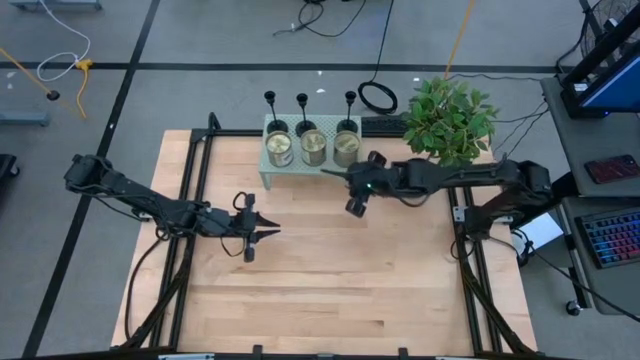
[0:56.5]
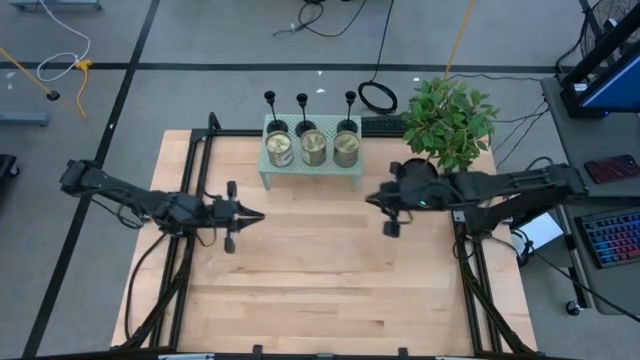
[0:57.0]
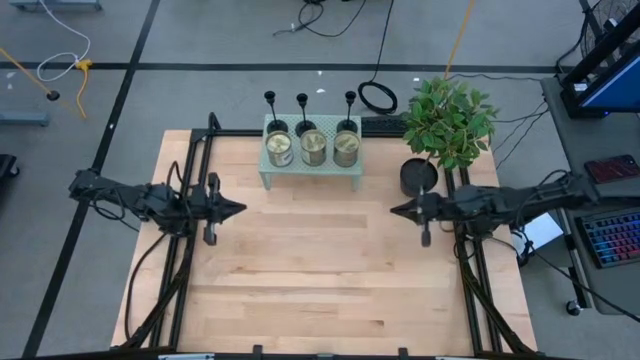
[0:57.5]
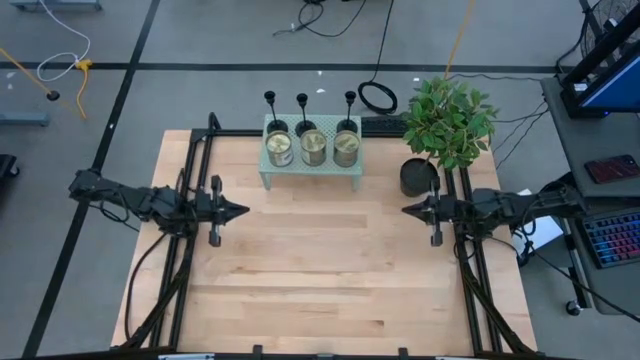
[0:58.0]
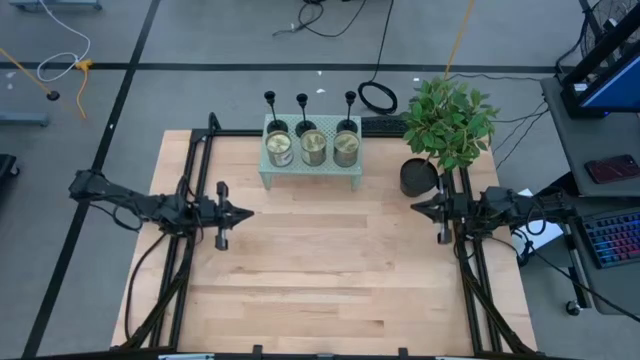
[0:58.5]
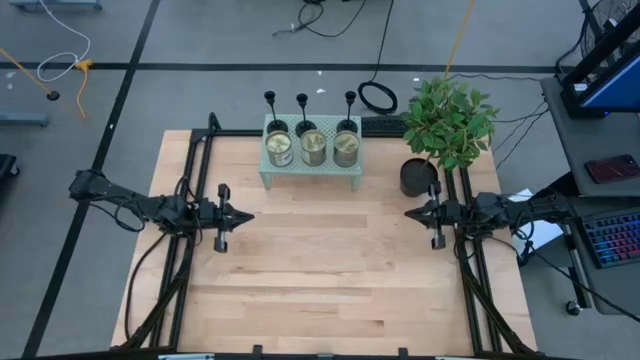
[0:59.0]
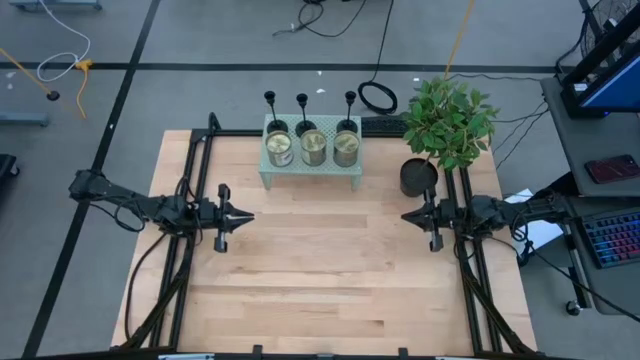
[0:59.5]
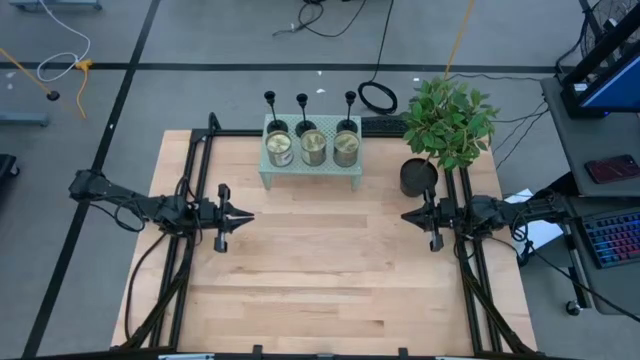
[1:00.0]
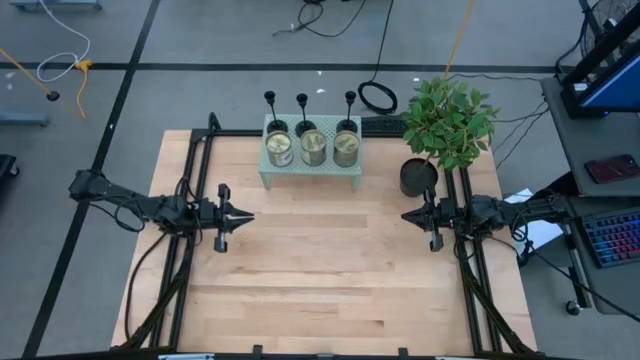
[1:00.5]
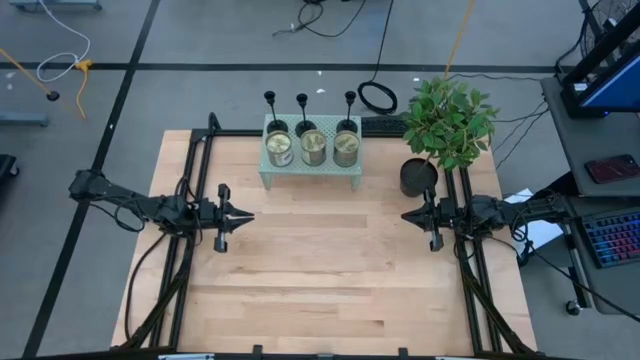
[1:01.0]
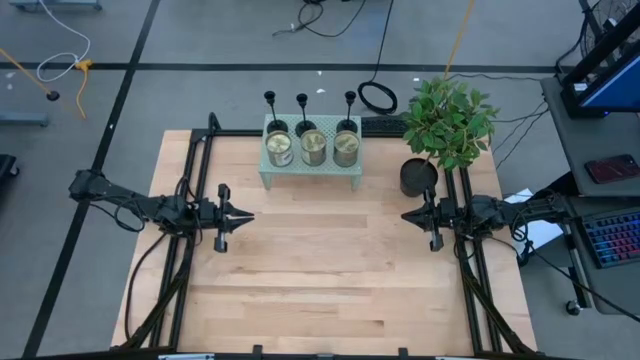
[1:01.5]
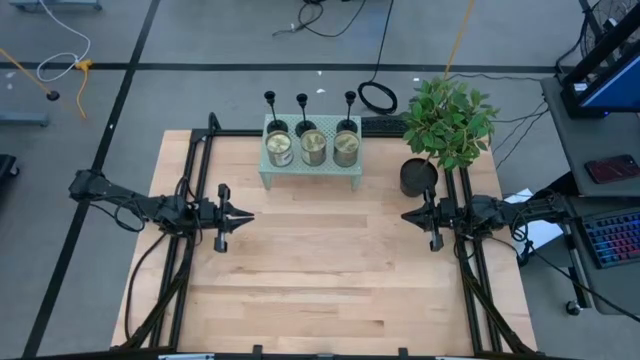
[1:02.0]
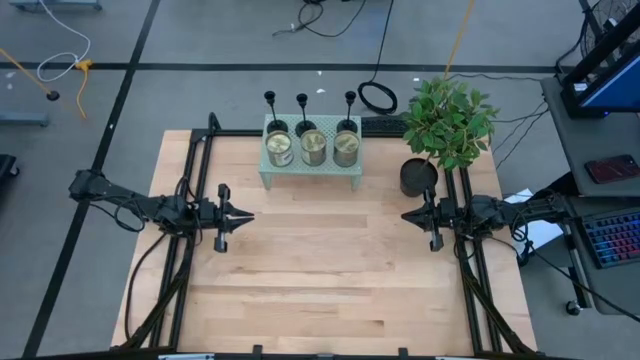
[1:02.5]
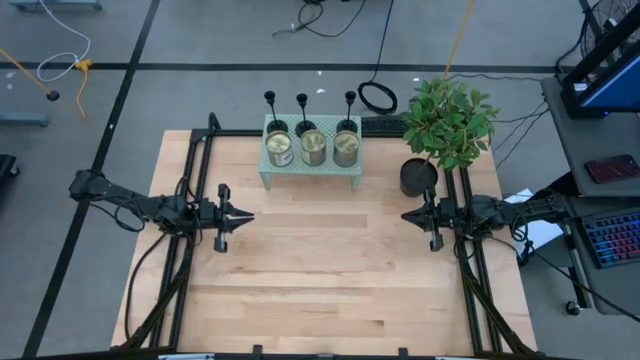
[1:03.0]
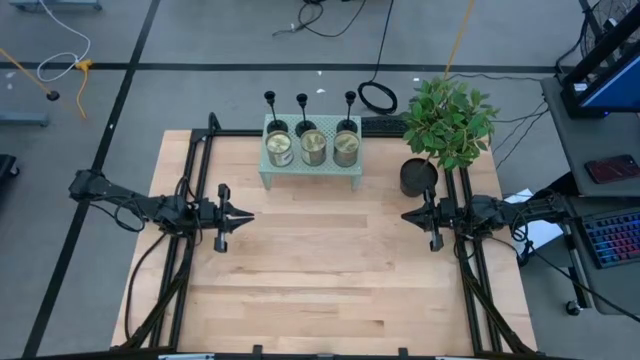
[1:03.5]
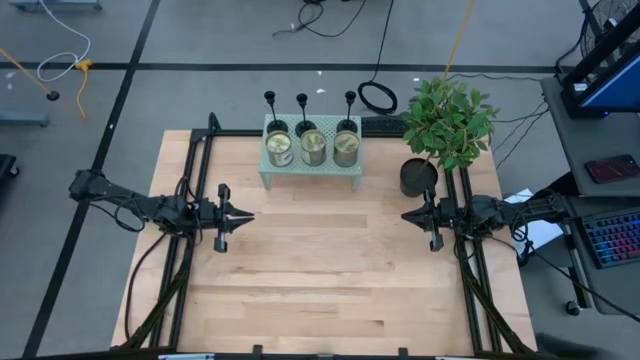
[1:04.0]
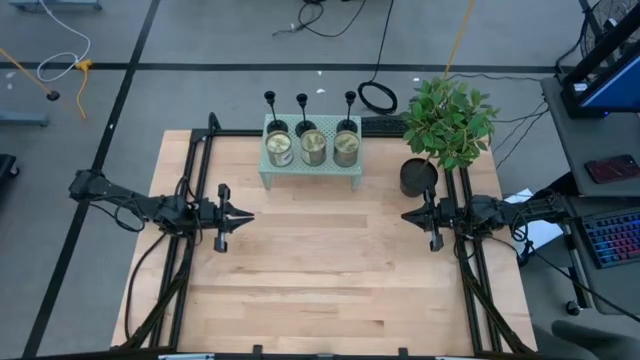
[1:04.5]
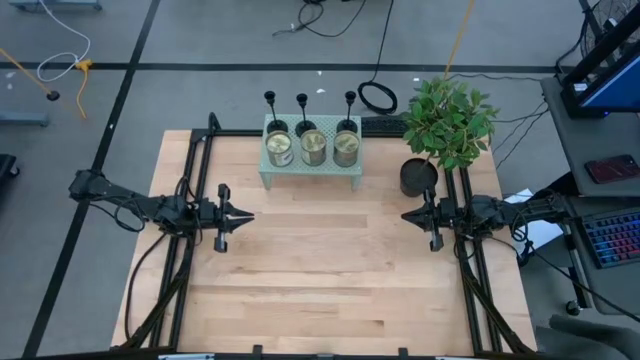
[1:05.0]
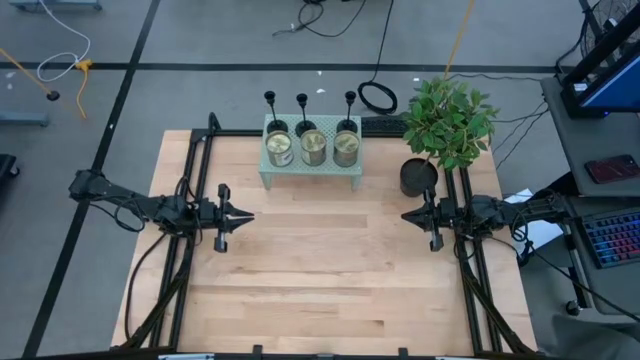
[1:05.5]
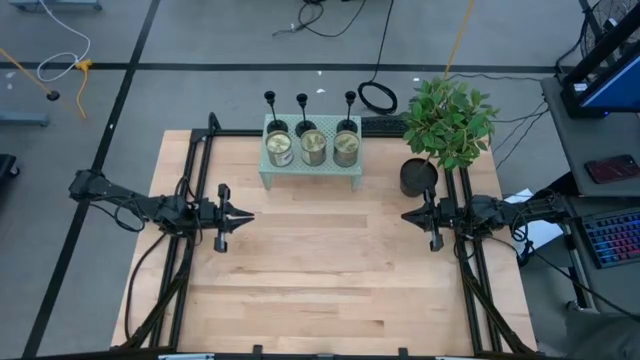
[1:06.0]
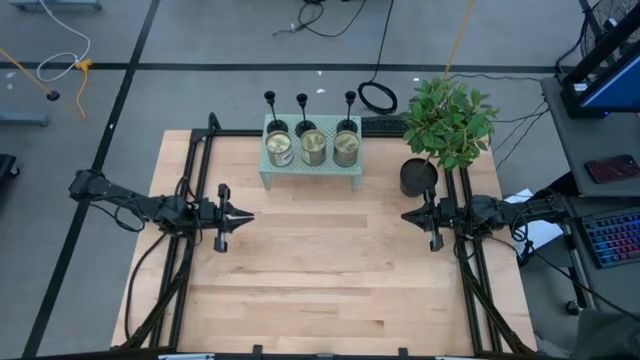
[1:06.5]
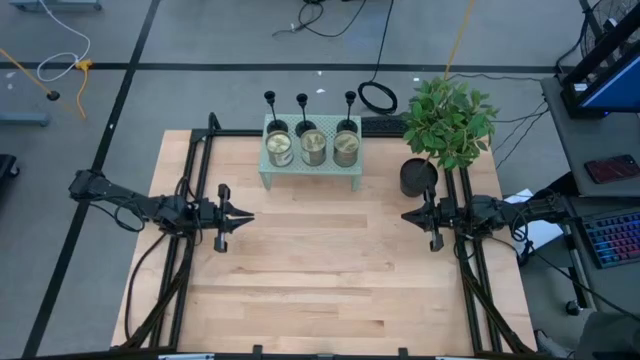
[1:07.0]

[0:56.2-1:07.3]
Task: Pick & Place candle stick holders
Return to home position

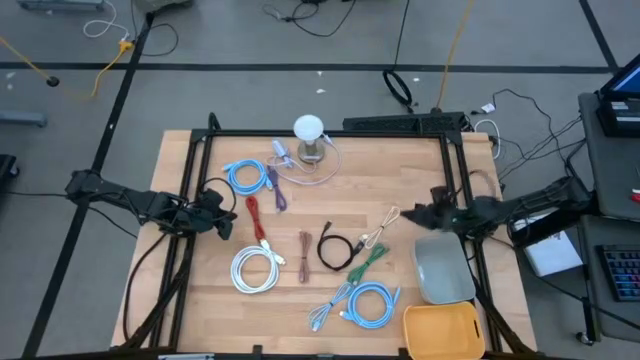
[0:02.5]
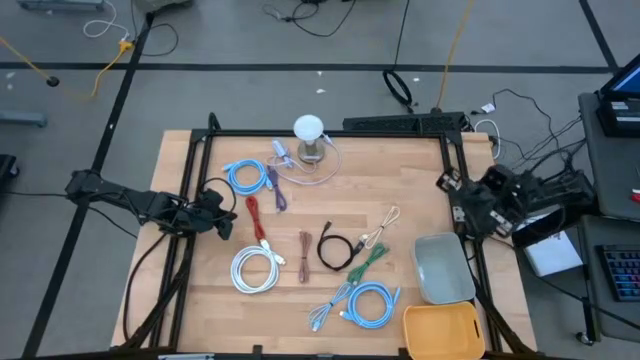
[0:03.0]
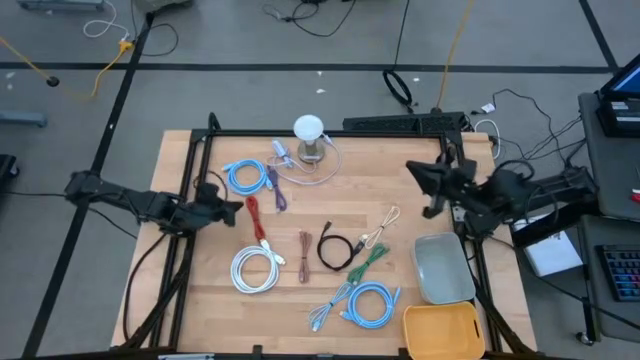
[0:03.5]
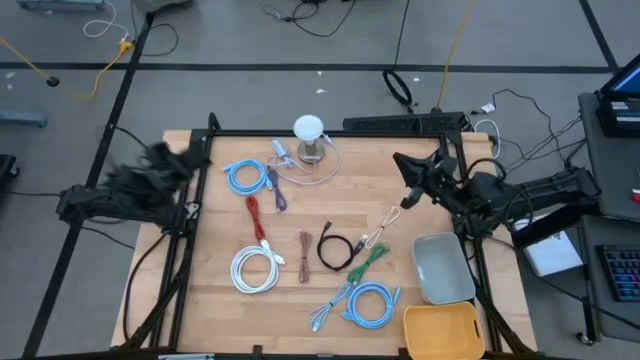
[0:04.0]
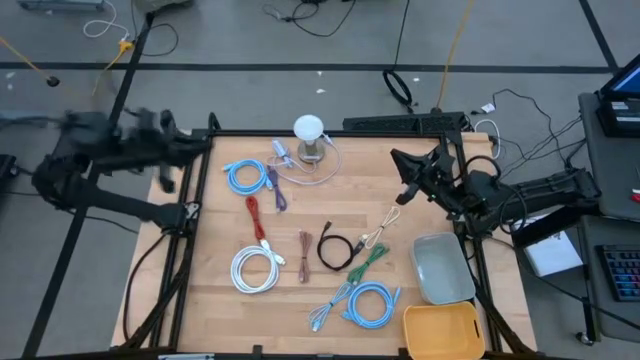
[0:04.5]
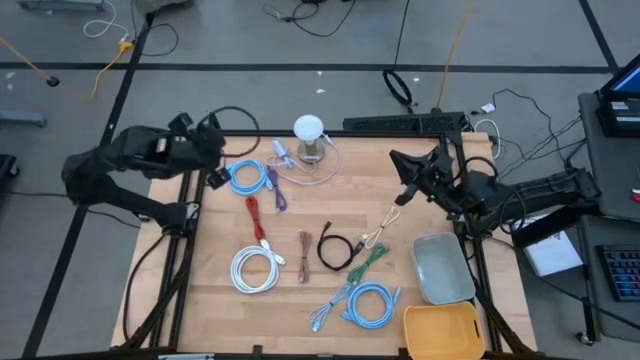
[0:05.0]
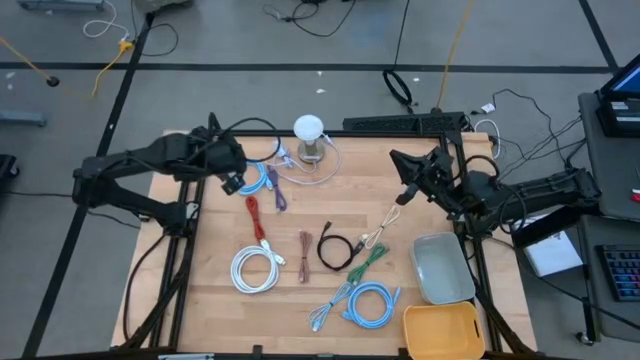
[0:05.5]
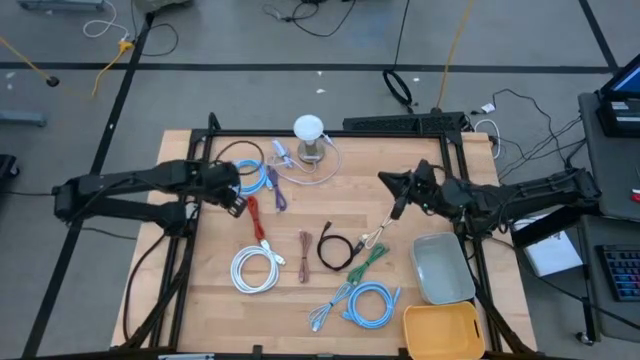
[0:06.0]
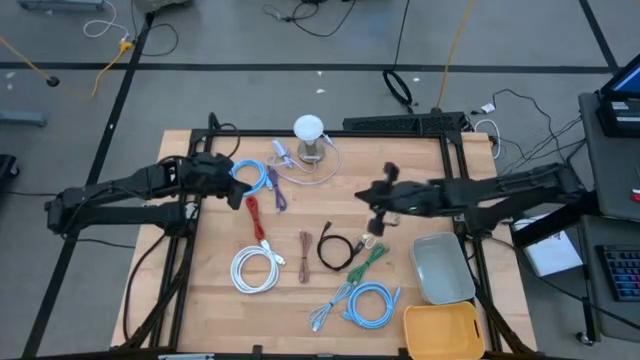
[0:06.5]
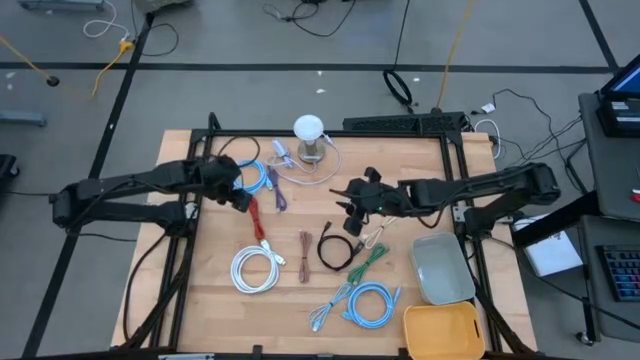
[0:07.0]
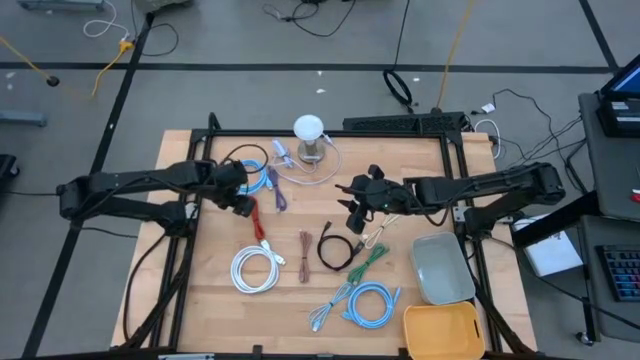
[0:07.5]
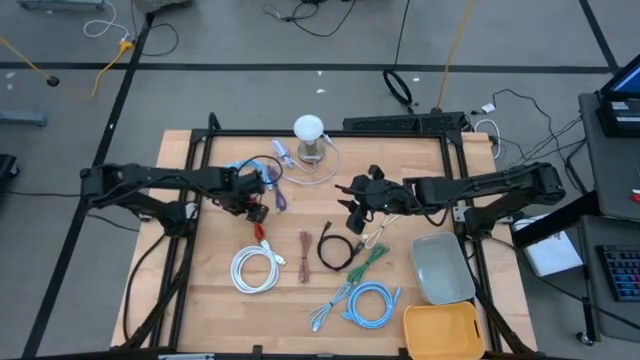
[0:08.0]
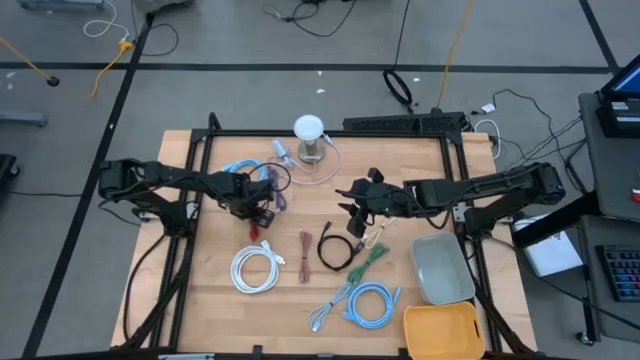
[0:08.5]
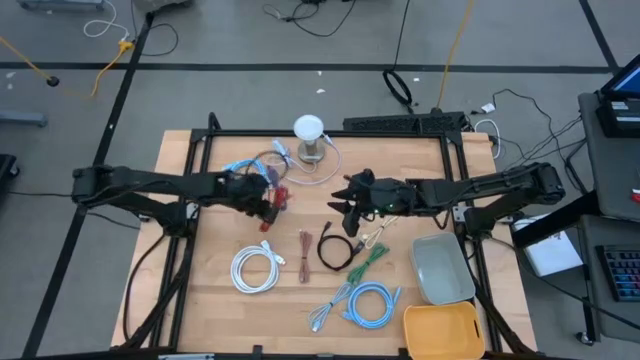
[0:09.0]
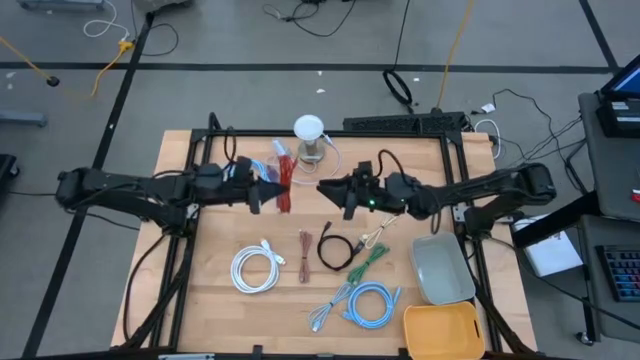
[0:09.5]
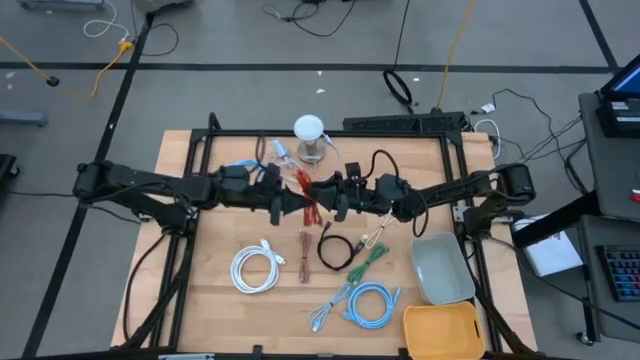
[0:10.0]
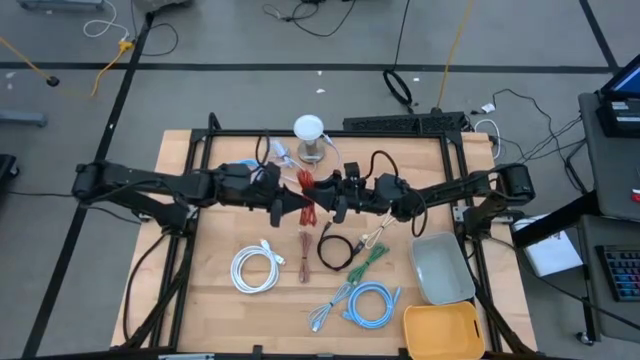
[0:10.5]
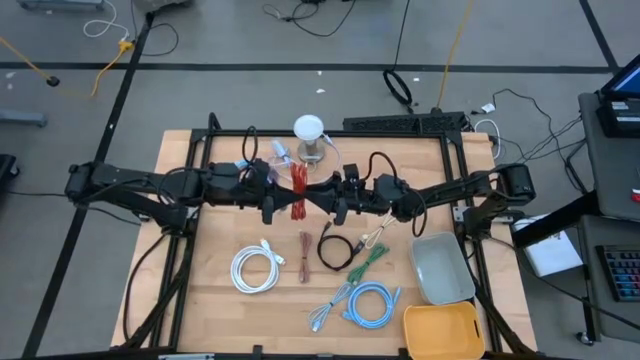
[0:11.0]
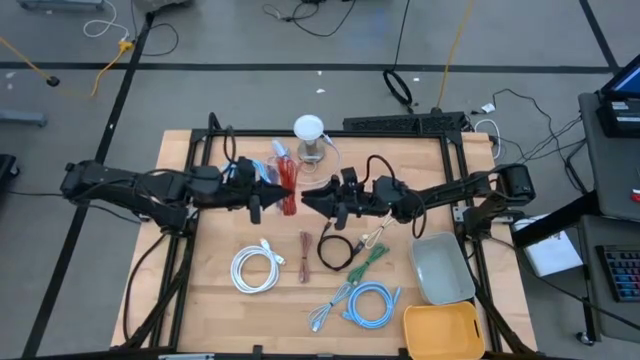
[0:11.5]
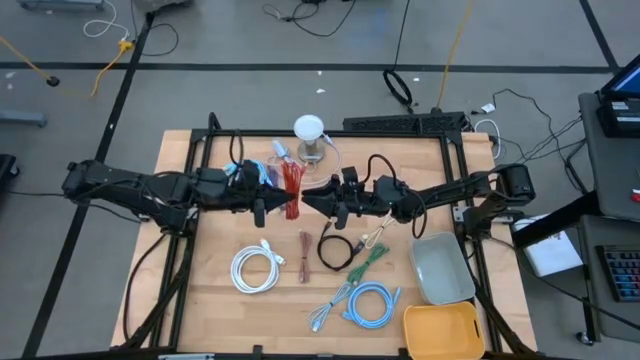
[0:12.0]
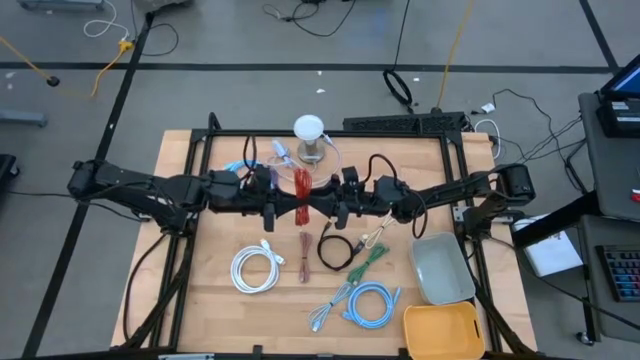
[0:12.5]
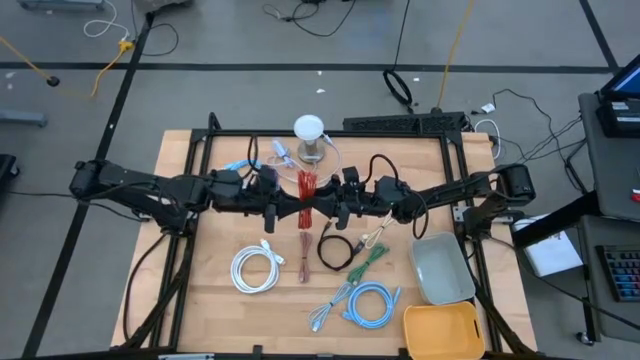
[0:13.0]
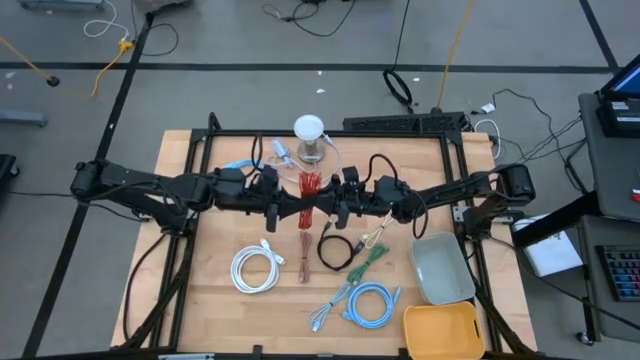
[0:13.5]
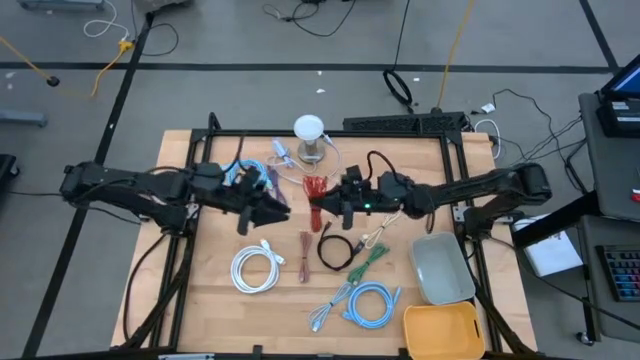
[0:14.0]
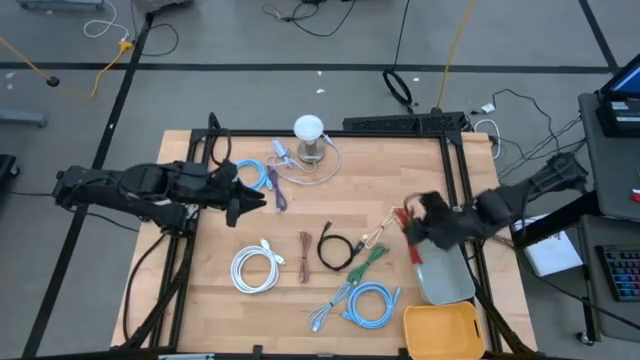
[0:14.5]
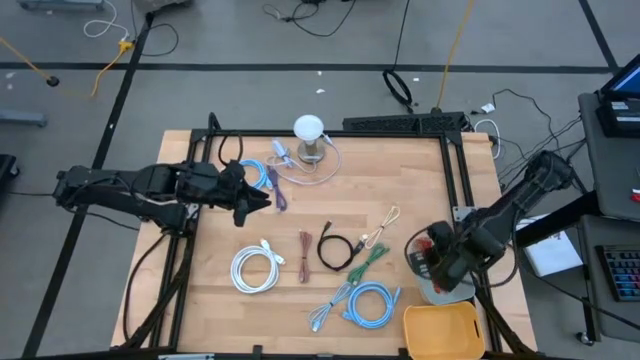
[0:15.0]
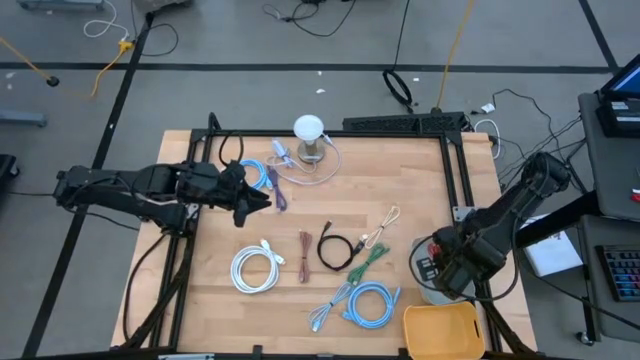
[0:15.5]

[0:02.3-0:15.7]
Task: Pick & Place USB Port
Put the orange USB cable into the gray bin
